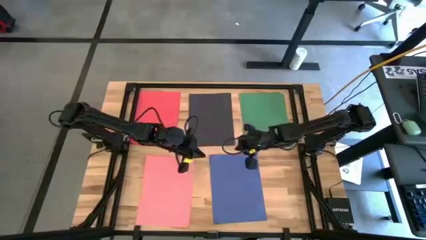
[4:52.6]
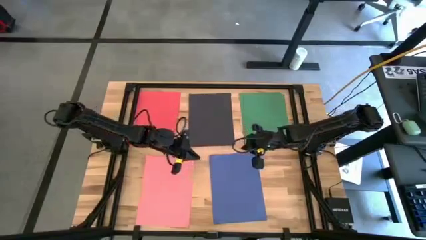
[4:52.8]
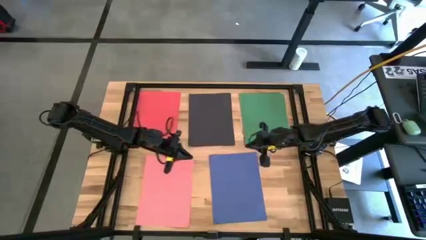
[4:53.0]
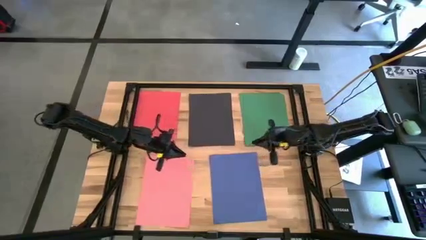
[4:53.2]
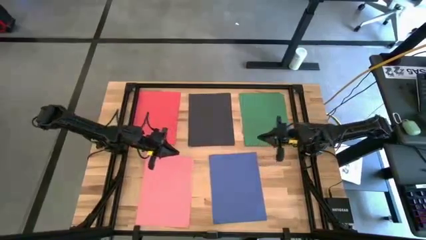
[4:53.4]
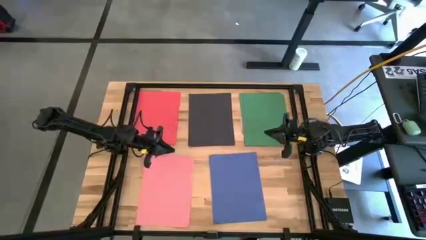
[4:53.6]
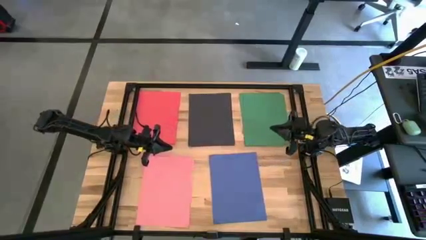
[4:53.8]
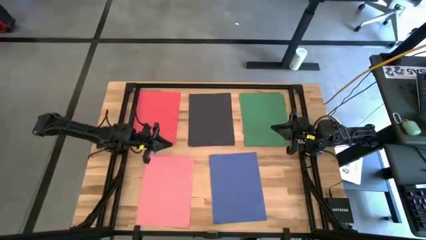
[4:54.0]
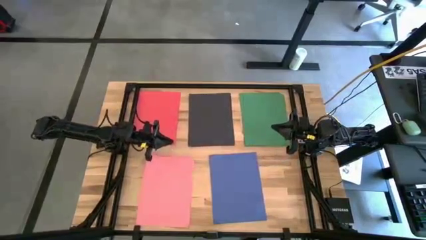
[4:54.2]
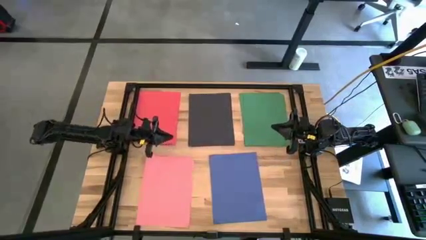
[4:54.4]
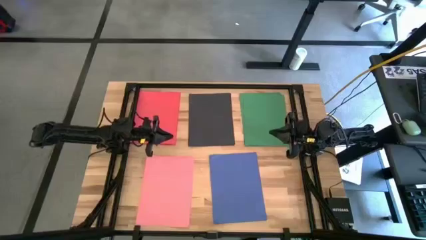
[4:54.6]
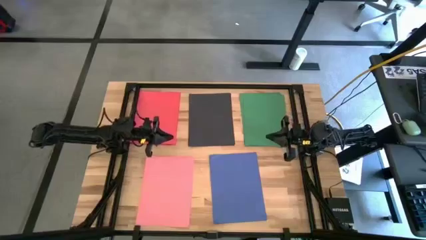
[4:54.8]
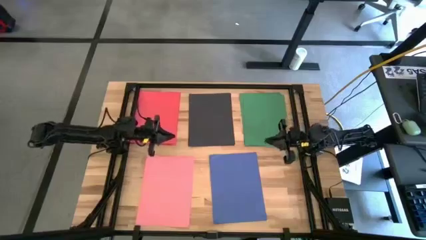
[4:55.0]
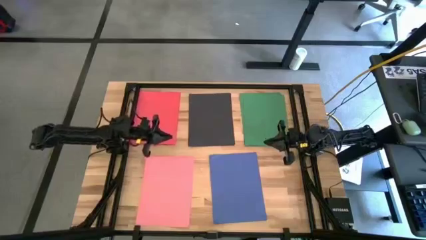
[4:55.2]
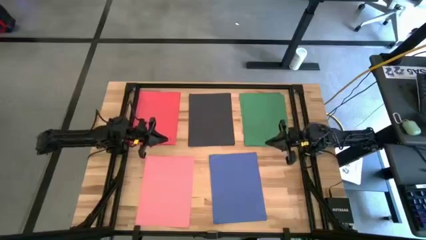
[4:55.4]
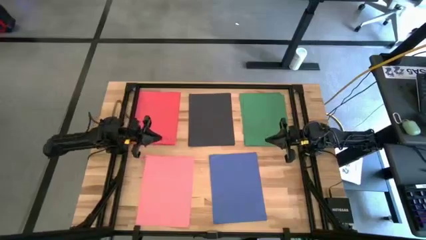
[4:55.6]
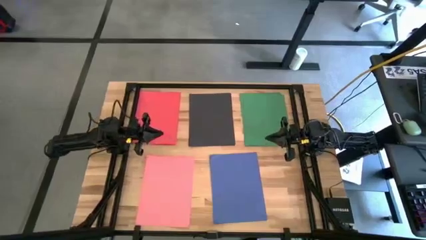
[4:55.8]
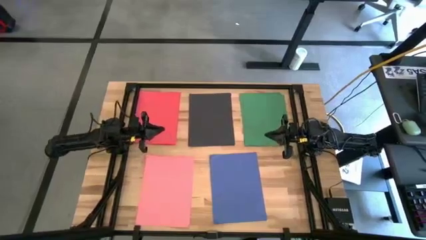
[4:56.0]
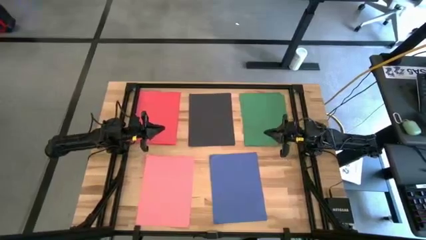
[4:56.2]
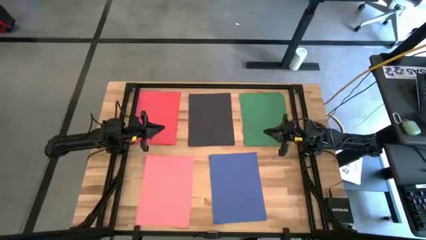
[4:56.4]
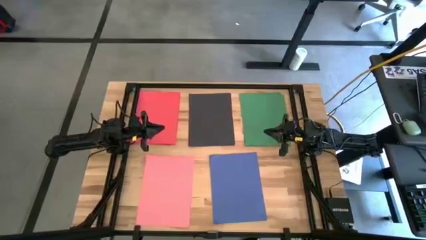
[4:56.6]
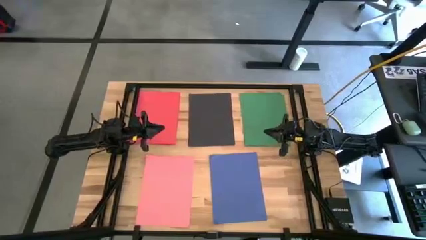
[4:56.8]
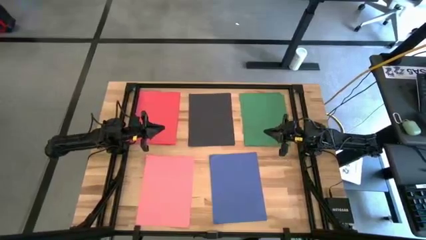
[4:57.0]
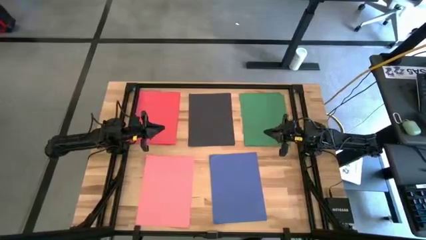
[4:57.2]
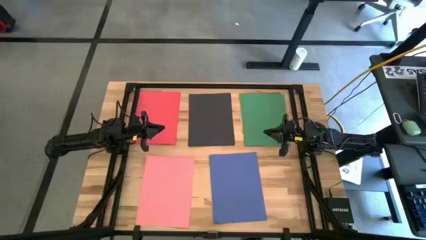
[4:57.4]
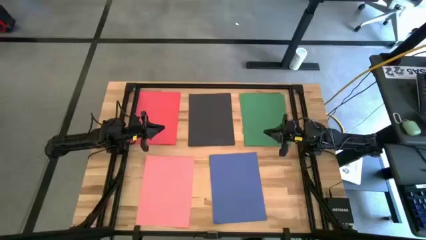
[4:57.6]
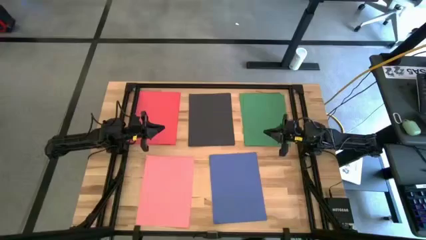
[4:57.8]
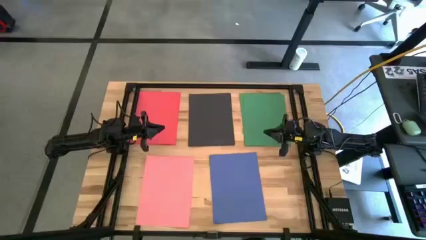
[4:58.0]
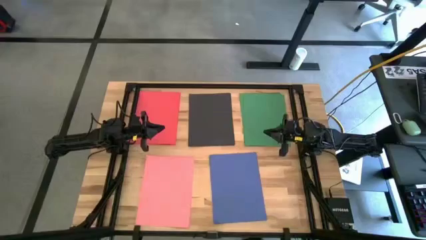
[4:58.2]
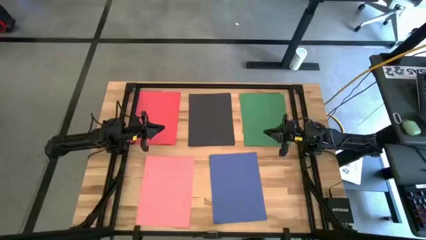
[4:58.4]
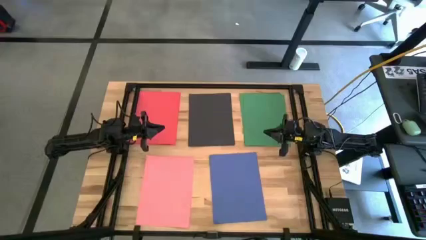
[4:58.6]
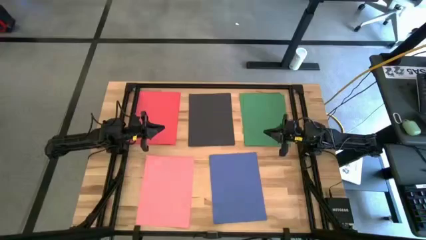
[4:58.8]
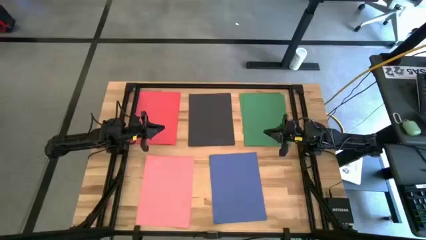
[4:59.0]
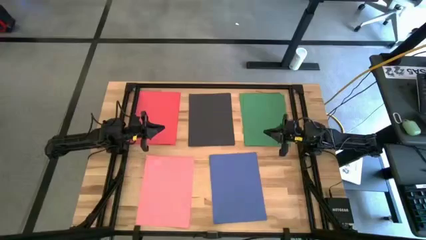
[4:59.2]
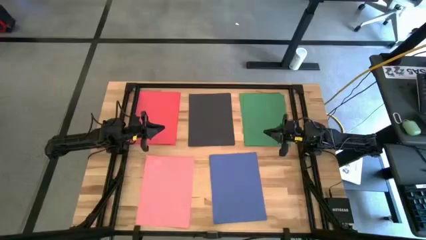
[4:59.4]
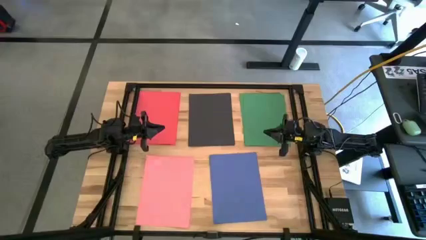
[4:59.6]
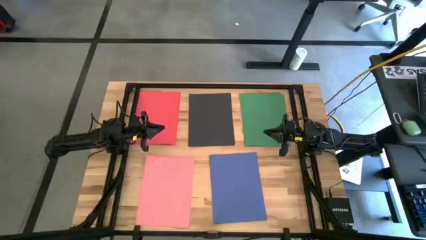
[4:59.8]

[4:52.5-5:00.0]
Task: Organize paper
Return to Home Position

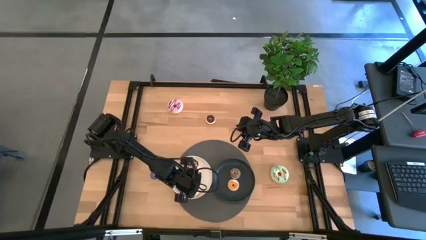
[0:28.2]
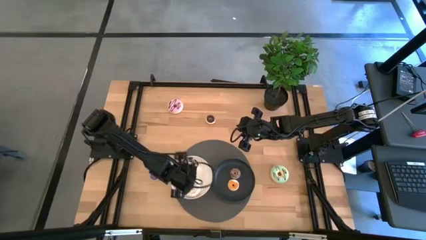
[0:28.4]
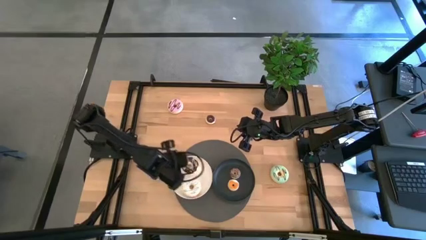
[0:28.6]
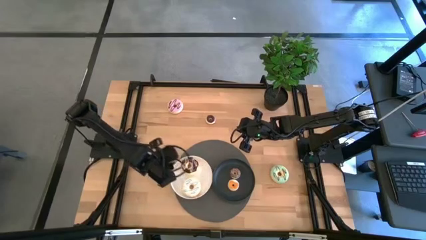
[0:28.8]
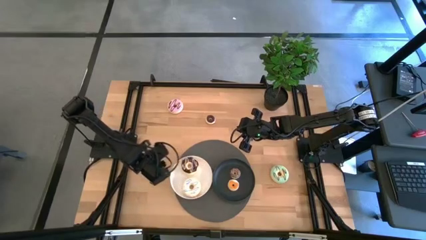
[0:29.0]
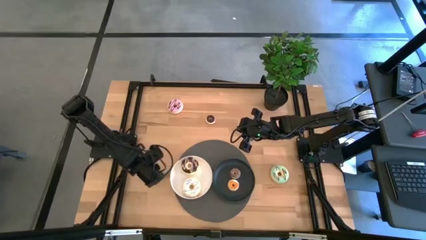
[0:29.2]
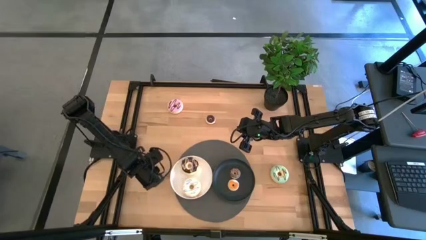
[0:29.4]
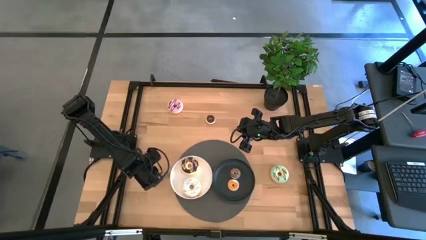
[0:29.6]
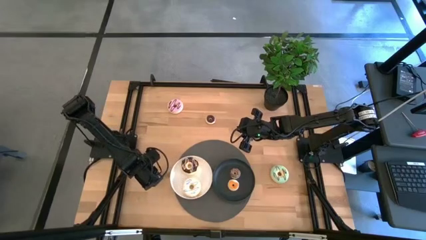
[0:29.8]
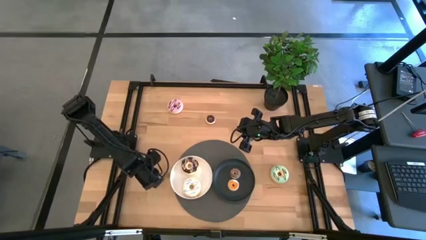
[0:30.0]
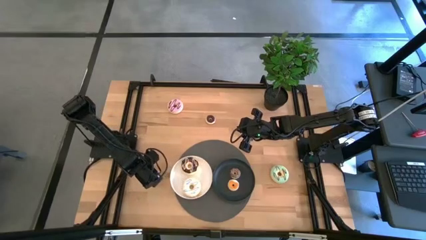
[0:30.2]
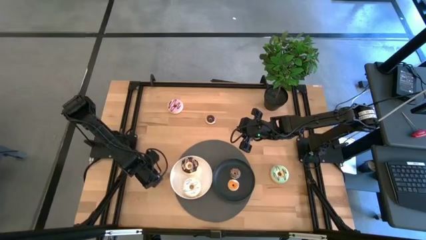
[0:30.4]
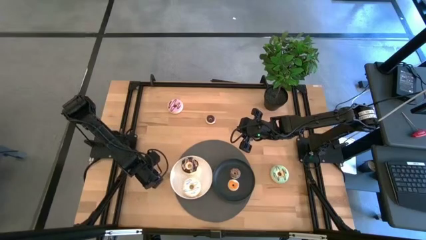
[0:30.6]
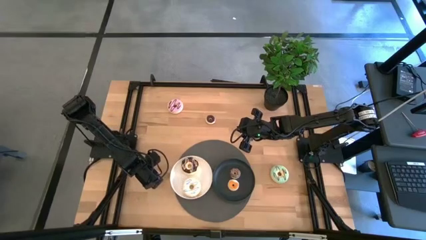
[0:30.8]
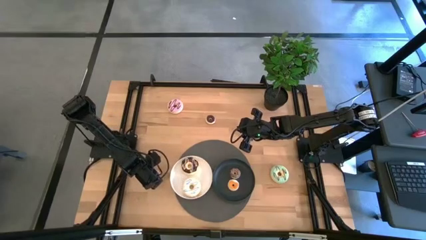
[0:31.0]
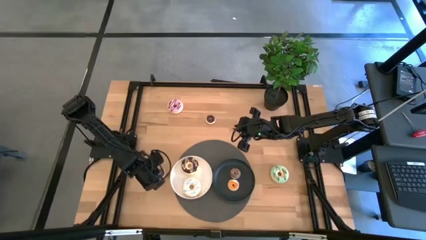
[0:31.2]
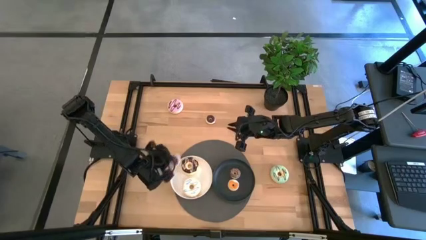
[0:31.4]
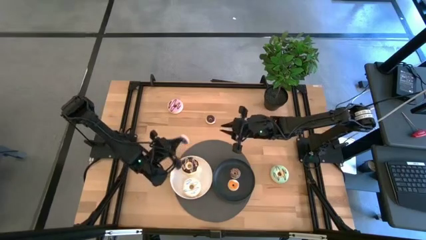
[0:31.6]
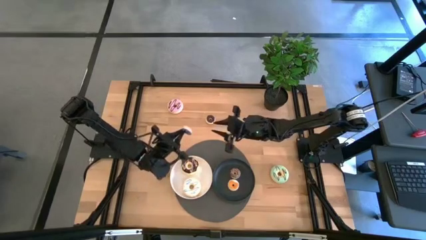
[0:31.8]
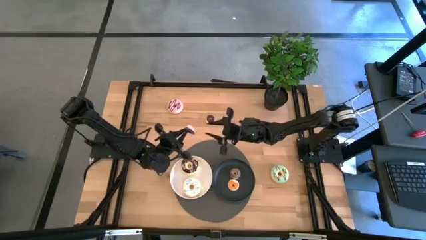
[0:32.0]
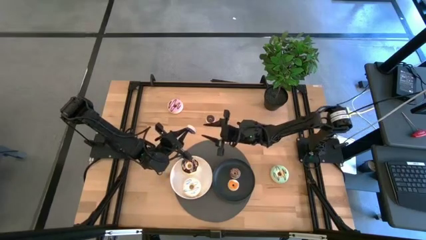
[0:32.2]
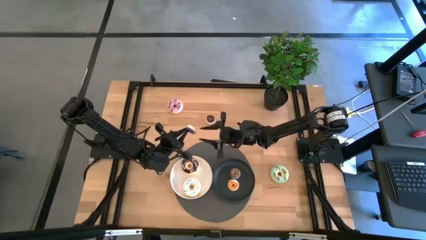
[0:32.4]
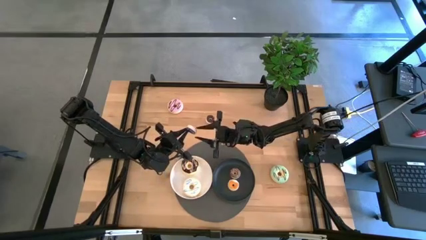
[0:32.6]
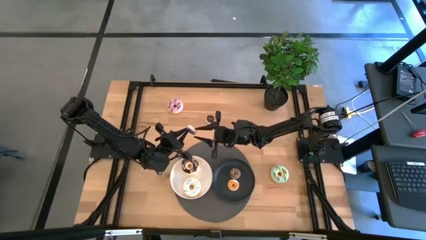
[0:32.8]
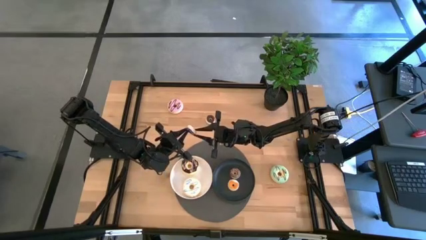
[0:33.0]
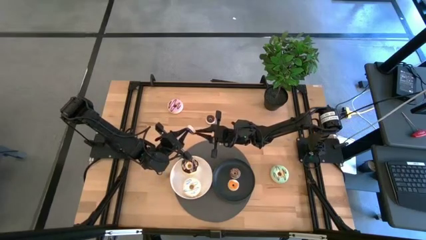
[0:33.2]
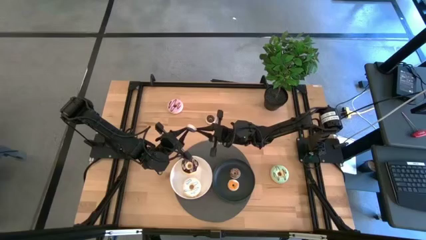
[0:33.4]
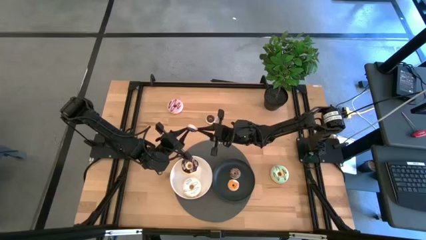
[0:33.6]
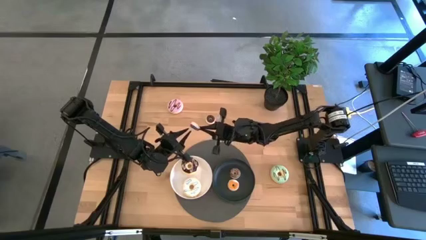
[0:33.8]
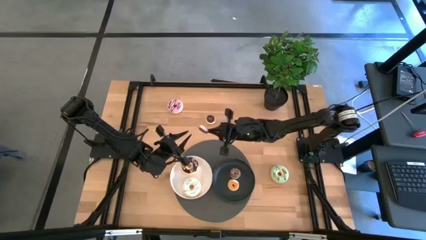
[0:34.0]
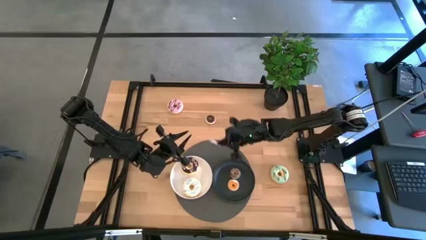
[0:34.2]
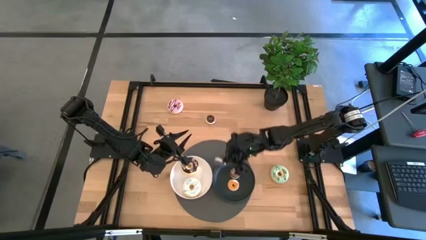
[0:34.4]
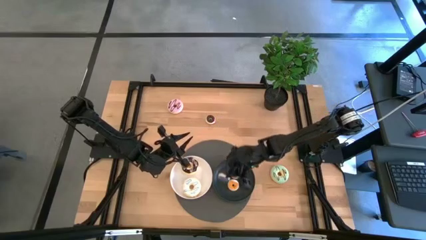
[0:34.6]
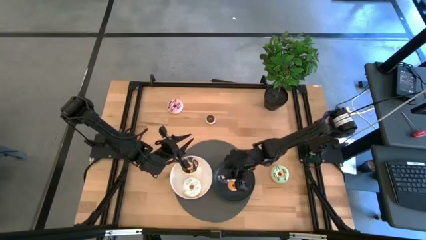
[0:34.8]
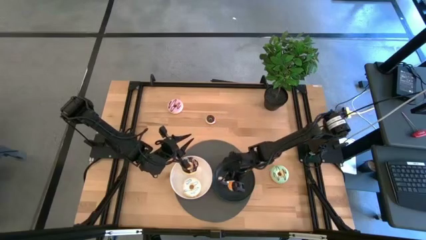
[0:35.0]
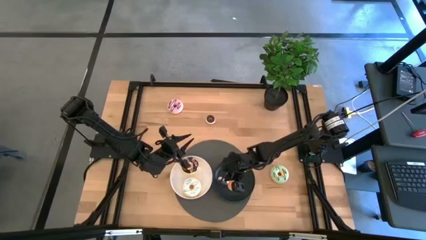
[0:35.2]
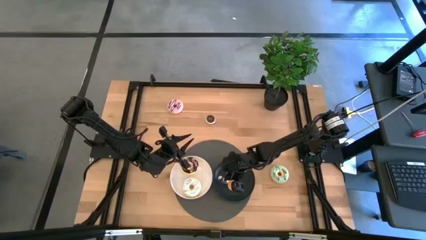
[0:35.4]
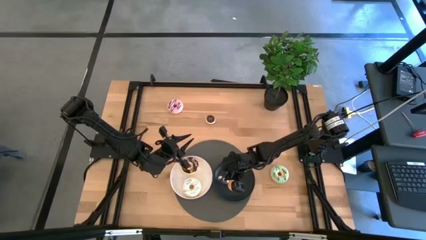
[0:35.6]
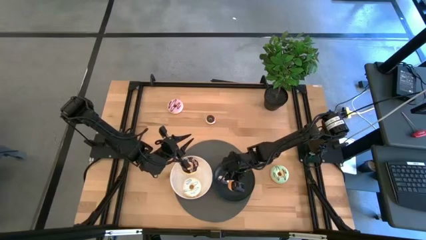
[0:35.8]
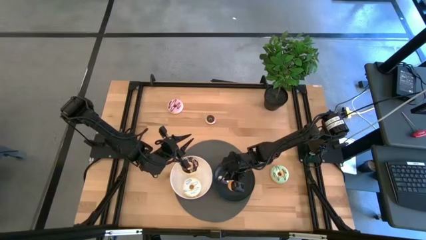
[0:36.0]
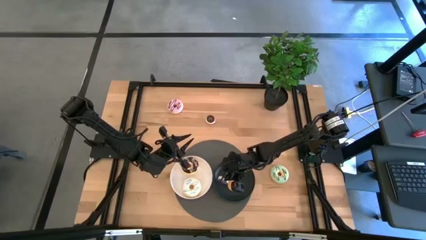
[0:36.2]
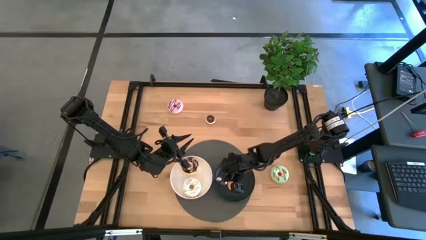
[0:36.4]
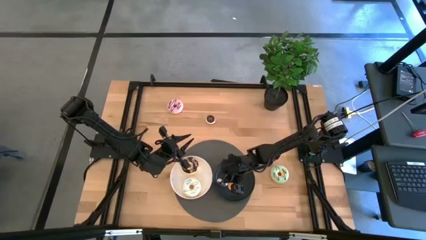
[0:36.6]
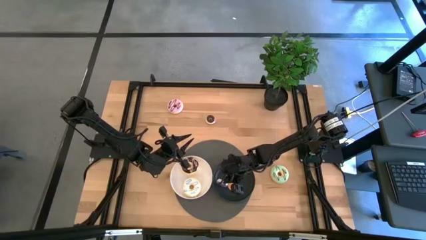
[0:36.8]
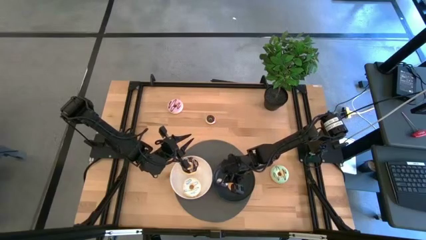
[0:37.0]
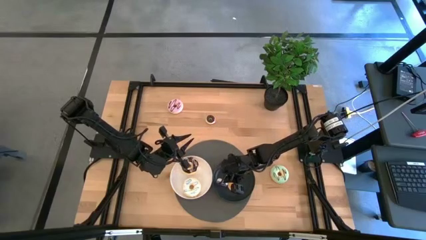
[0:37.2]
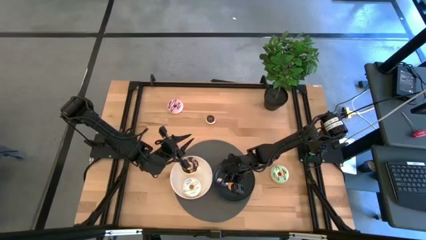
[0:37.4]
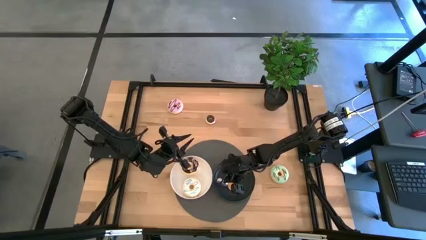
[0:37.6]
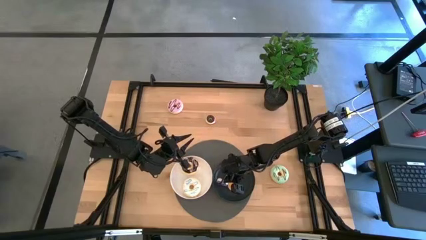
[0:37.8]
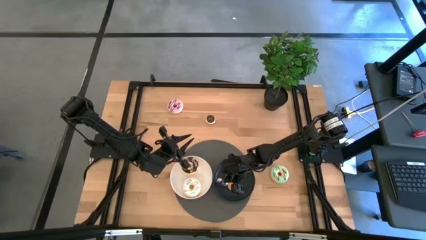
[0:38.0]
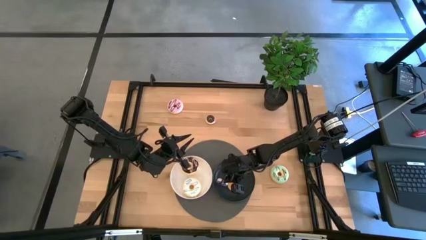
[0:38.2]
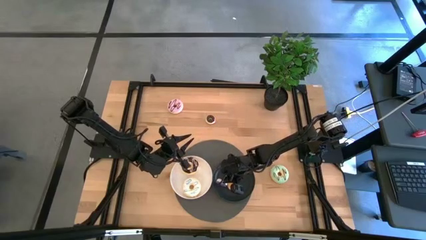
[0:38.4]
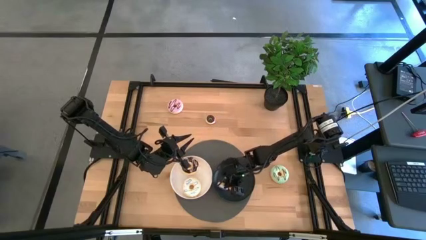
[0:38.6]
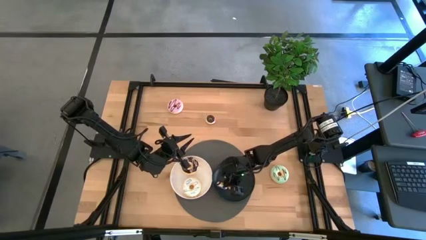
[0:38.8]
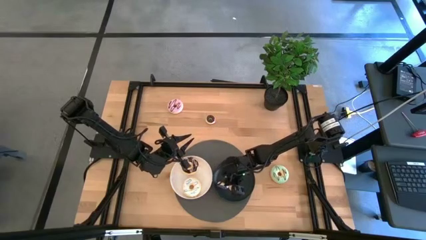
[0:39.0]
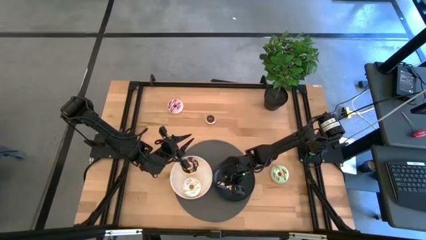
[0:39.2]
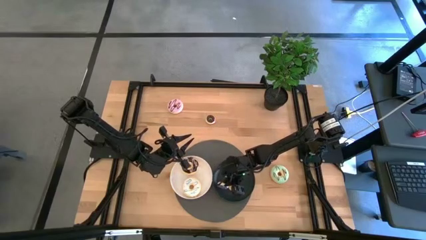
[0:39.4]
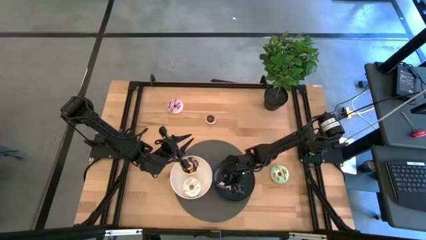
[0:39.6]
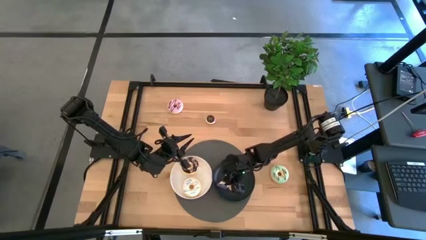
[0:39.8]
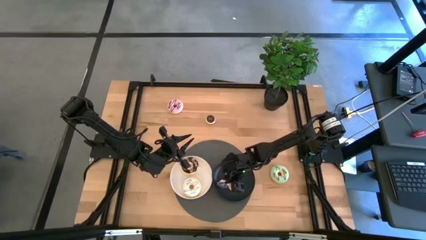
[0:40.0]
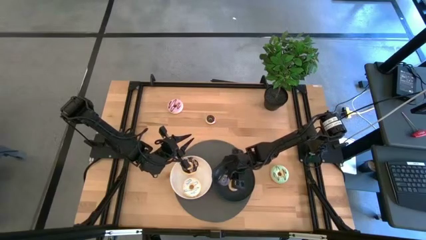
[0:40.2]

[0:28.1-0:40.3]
Task: Pick & Place donuts
Put the small violet donut on the black plate
